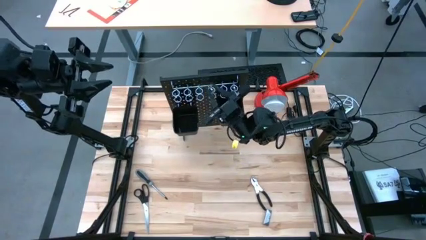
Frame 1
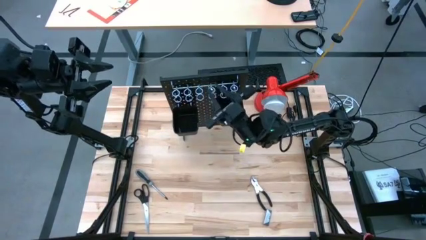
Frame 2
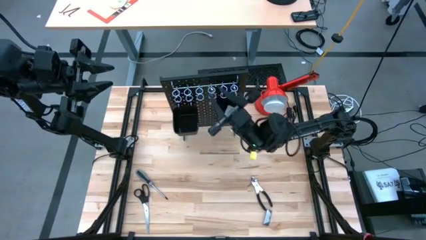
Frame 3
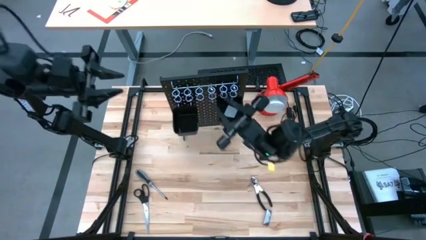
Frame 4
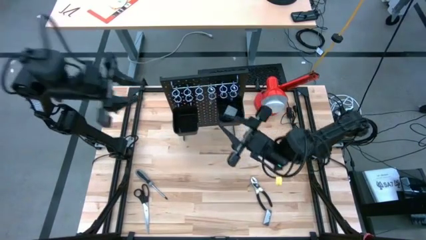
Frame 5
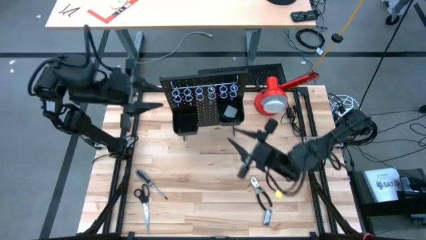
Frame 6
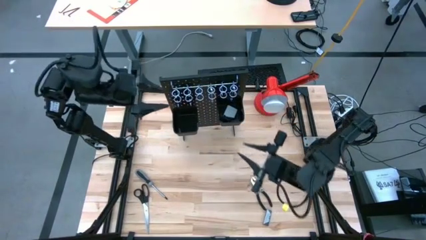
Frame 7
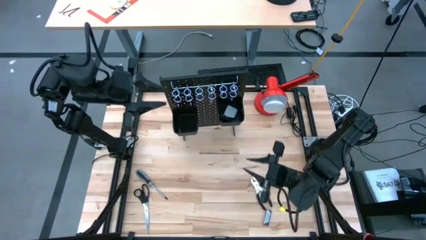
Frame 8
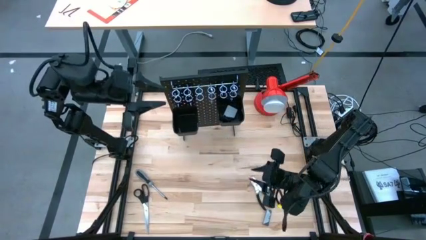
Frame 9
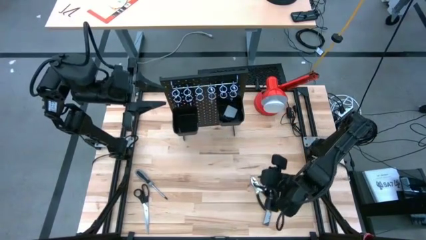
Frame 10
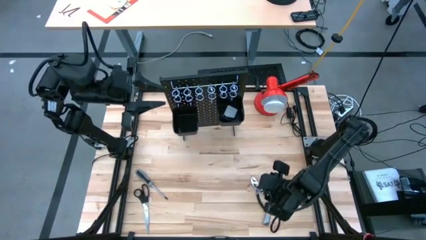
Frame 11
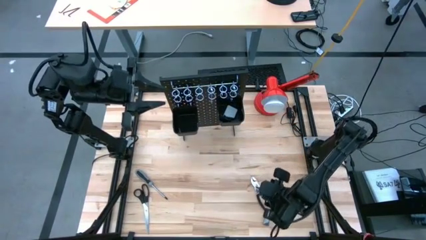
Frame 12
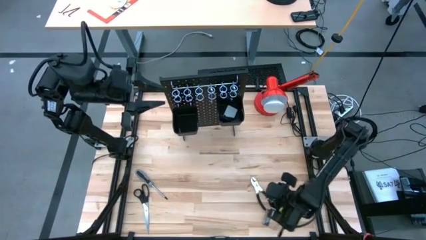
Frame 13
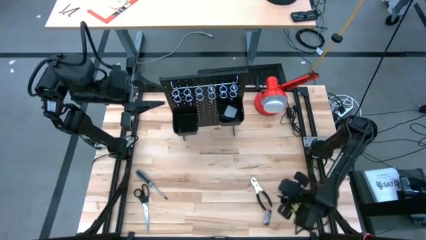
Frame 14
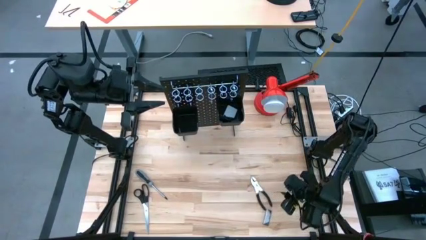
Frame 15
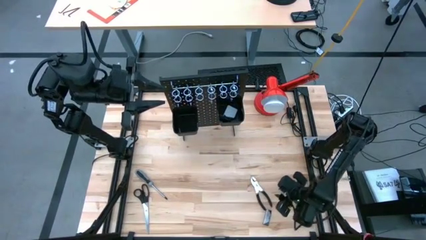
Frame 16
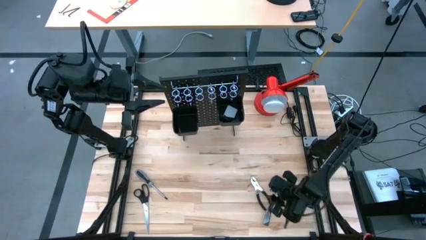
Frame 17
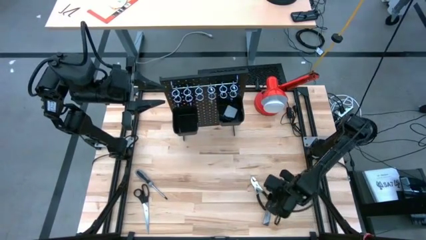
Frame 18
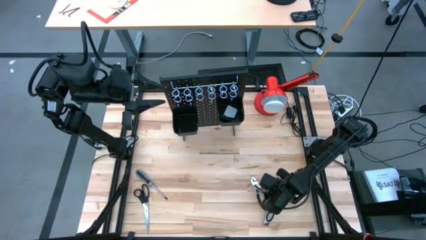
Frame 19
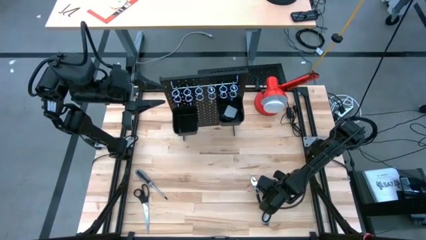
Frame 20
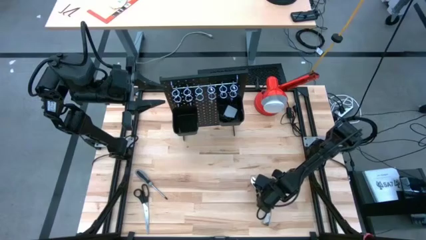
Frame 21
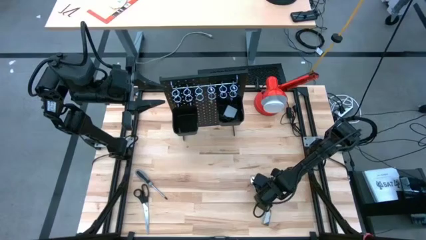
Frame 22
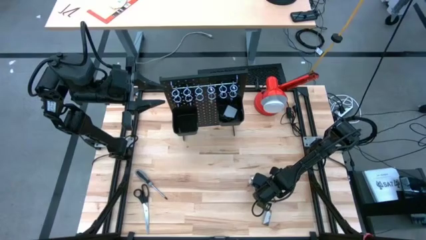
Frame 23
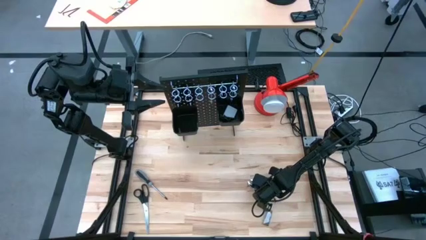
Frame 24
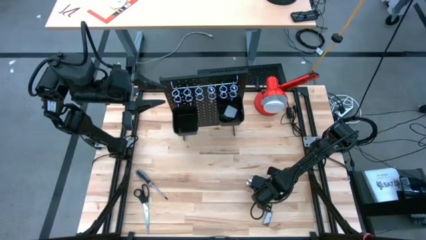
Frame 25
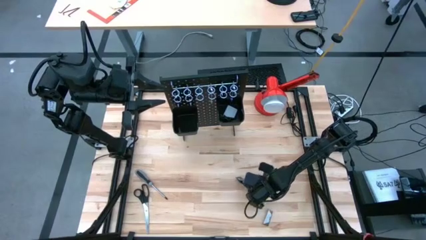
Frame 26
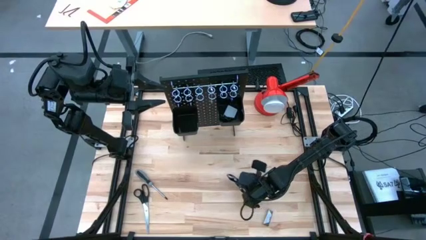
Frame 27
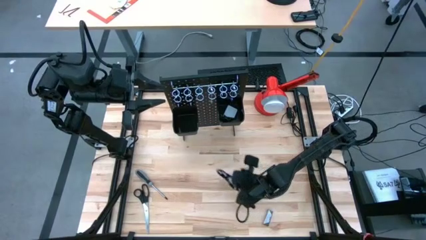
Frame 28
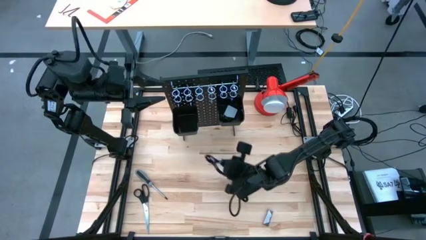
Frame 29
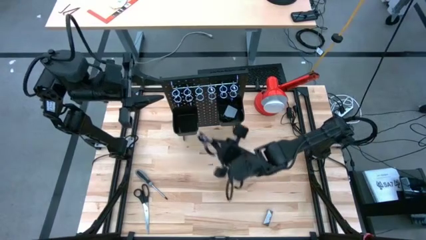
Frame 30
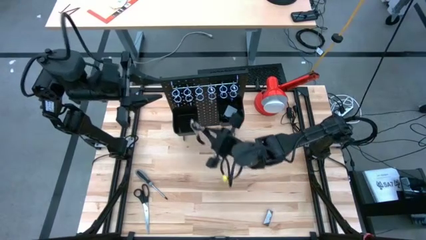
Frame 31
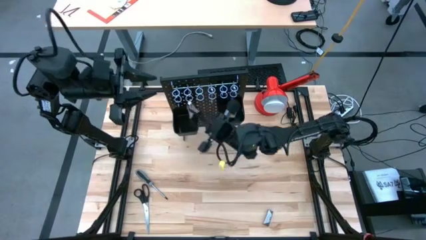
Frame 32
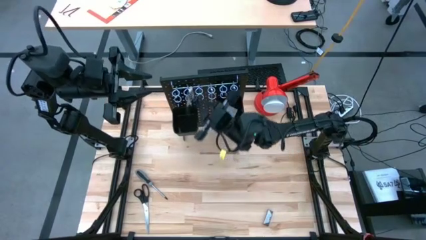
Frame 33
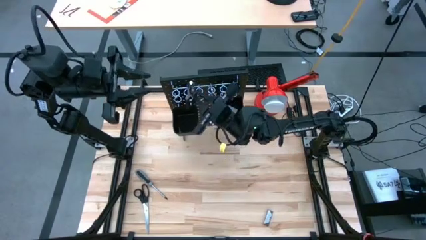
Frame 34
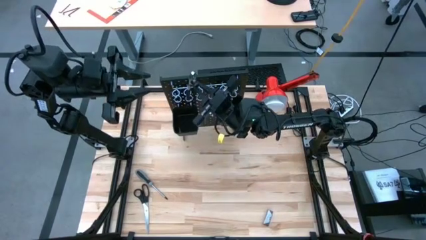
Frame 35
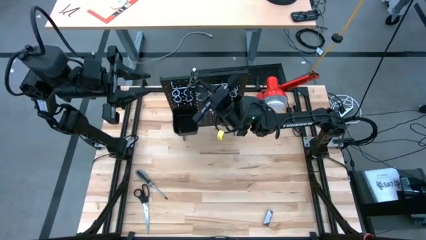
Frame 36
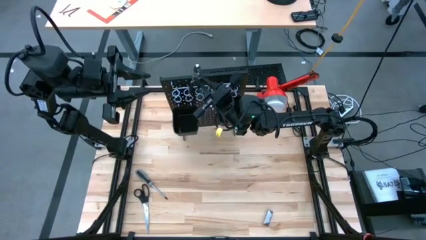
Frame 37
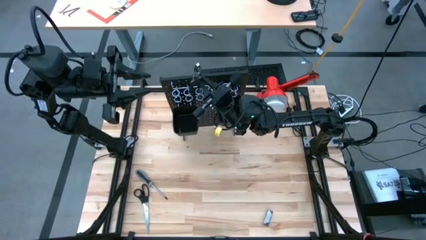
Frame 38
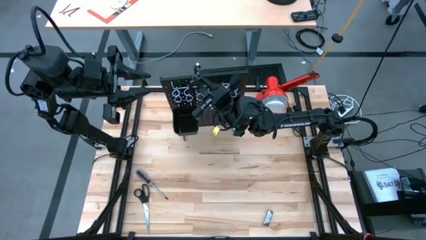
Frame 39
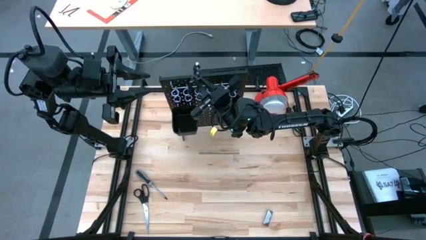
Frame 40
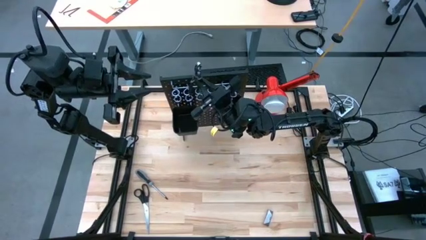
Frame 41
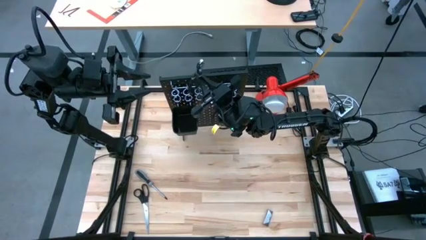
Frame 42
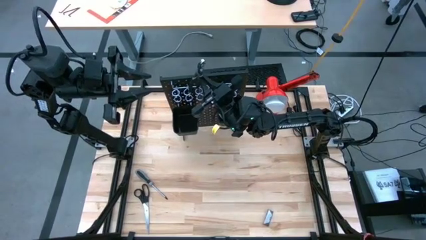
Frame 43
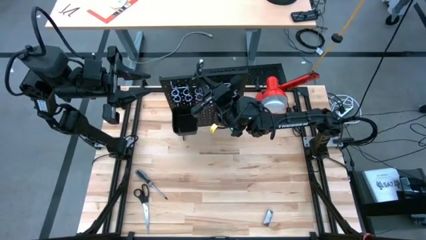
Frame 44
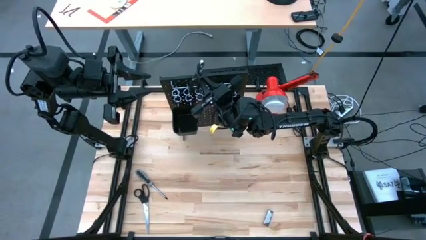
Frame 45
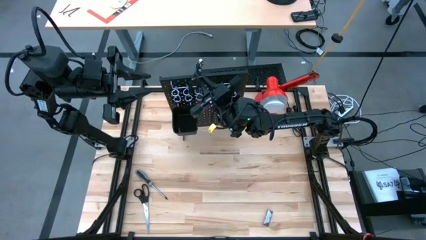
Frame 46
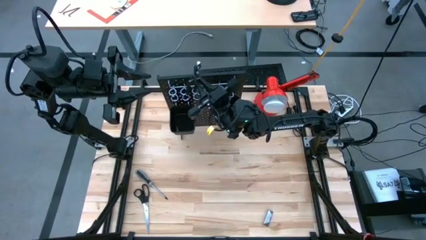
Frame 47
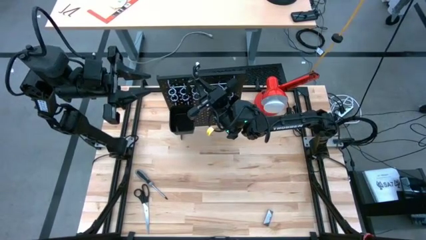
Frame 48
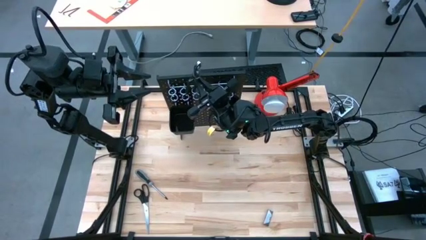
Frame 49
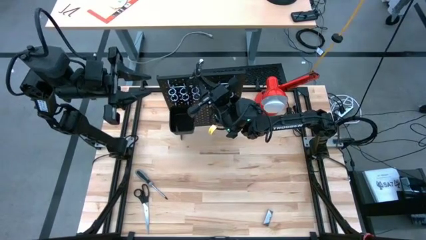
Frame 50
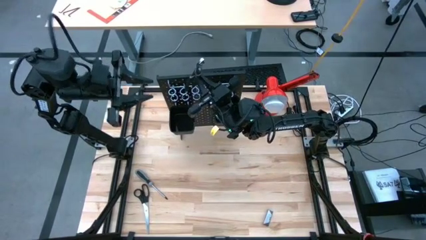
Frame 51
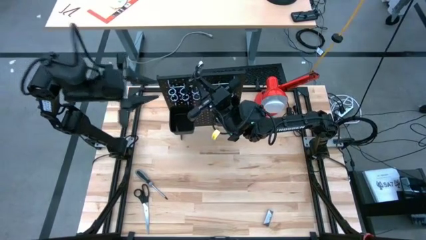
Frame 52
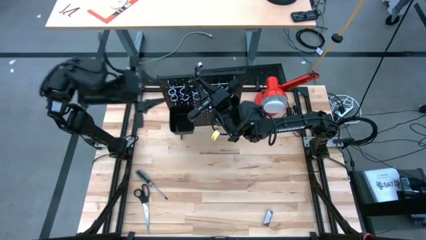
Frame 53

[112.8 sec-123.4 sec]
Task: Hang tools onto peg board
Hang the pliers on the pegboard

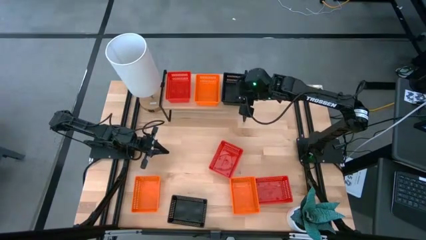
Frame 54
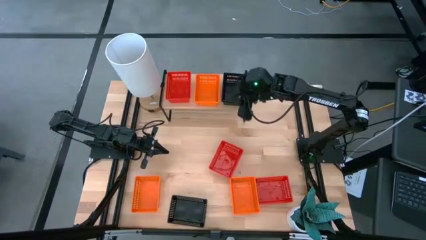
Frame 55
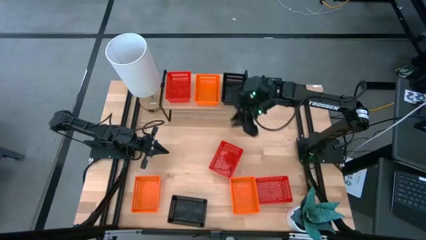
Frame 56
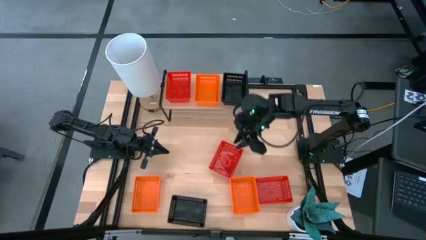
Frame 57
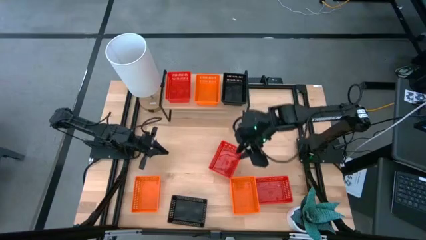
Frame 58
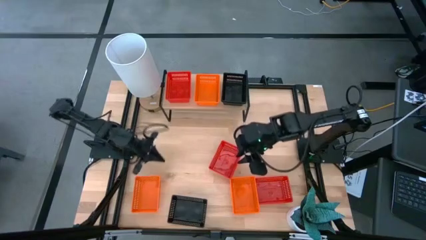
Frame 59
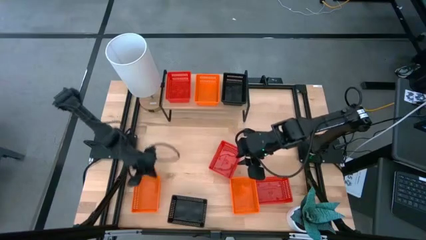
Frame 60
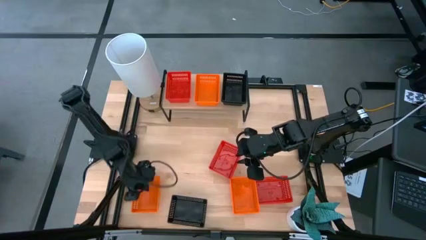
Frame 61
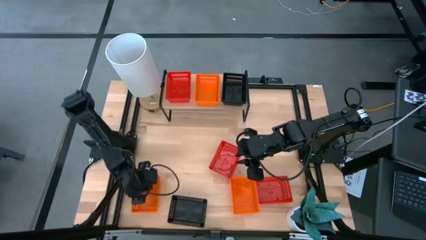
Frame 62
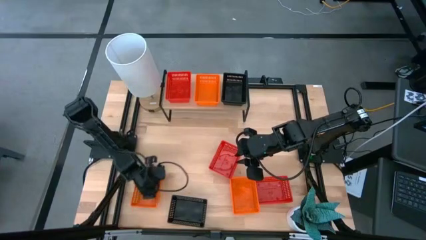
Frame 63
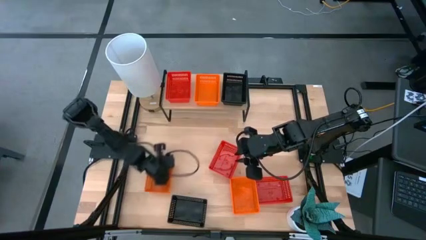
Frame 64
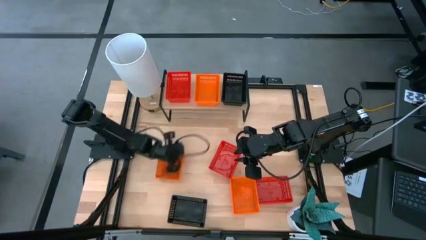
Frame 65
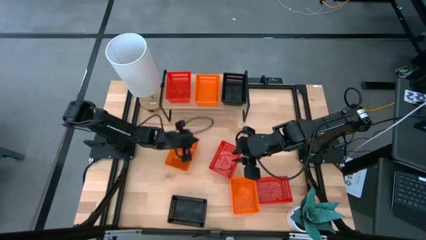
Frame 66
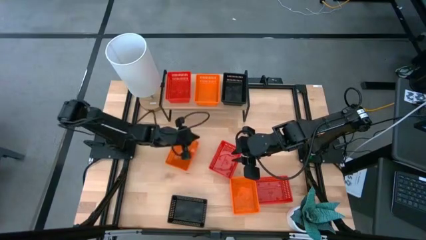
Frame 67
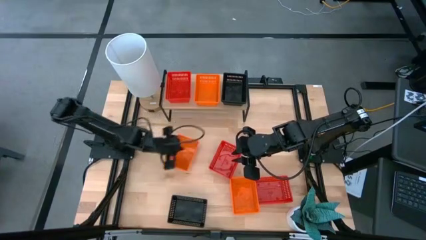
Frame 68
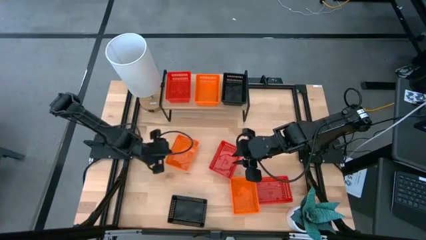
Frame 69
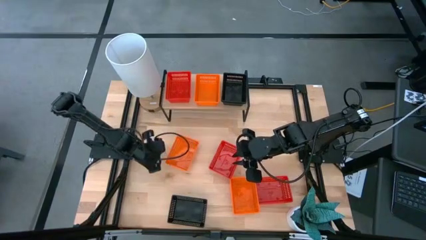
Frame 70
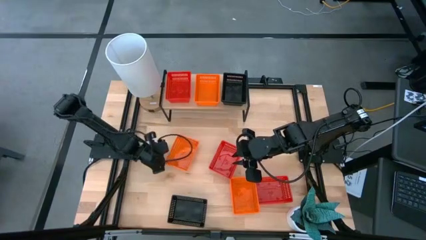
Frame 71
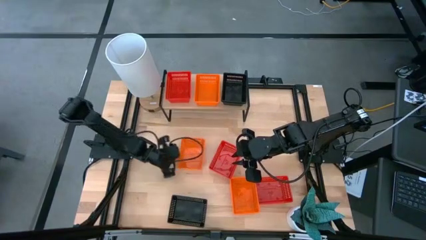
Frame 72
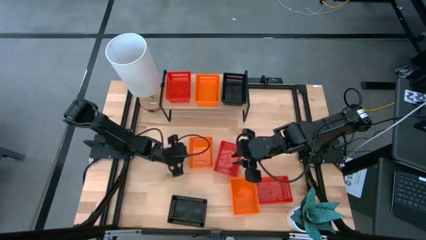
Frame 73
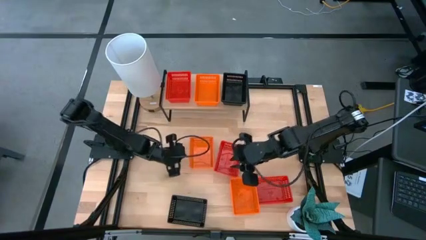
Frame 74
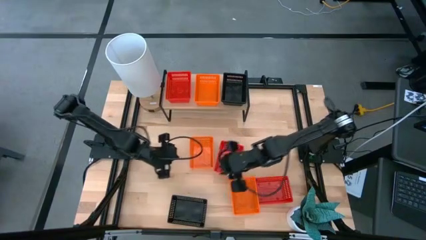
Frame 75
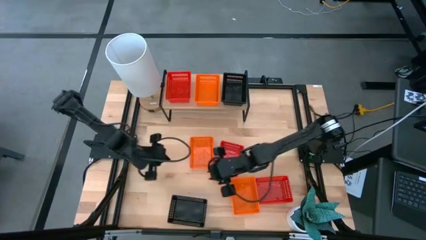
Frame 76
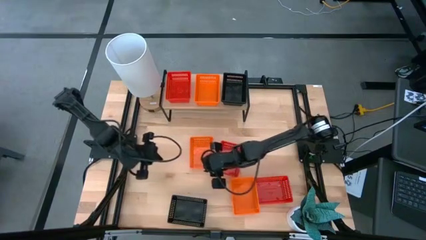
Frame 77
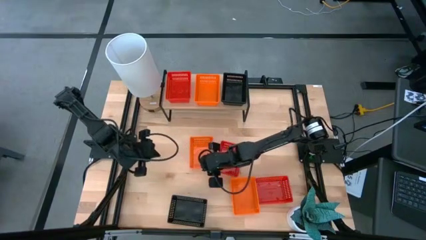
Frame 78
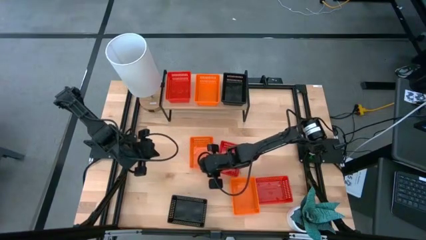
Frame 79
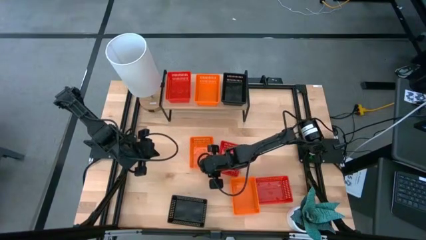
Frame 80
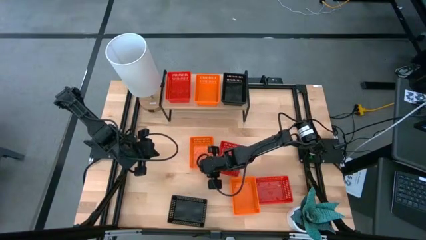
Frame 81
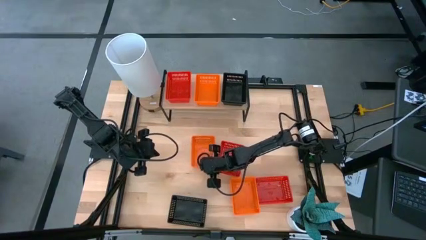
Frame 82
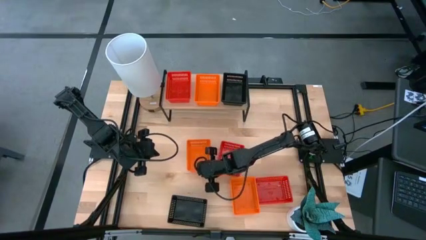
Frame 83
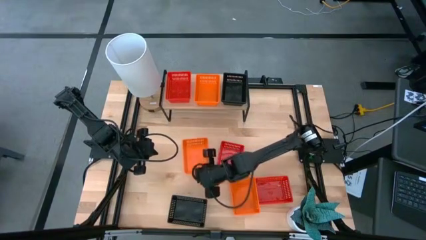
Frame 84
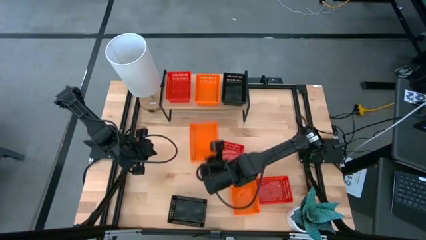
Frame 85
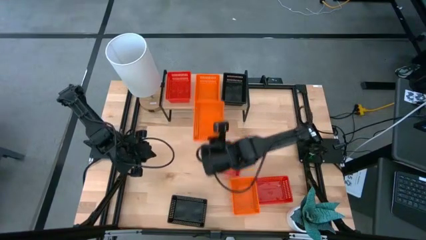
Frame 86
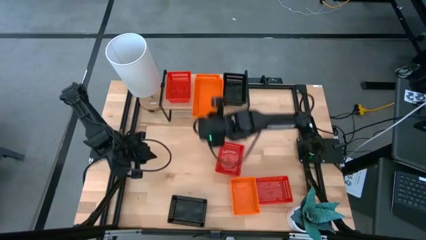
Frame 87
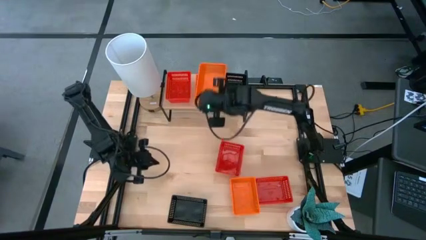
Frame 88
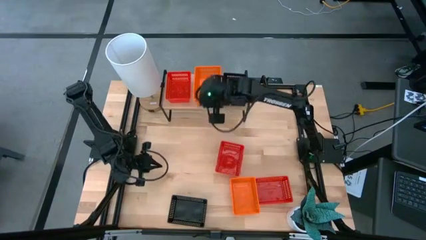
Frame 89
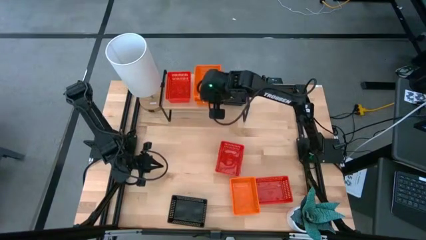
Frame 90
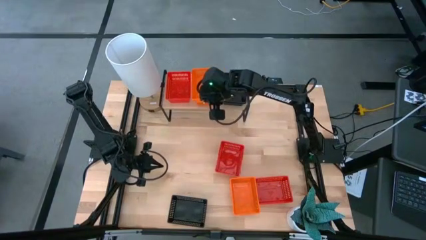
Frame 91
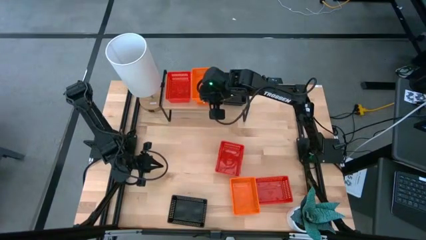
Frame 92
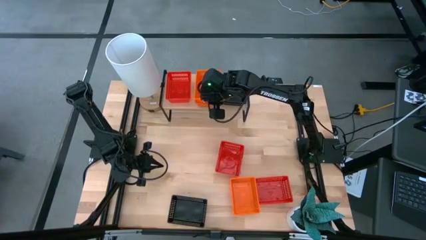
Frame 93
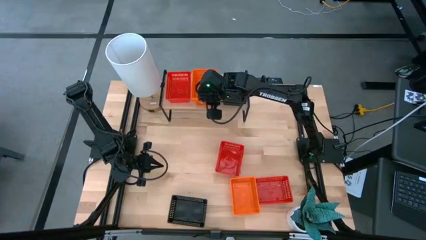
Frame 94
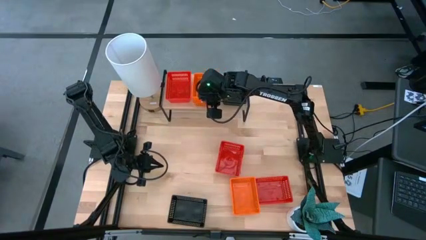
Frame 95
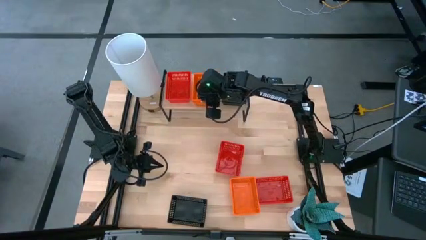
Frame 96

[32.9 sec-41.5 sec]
Task: Stack baskets on shelf by color
Stack the left orange bin on the orange bin on the shelf
